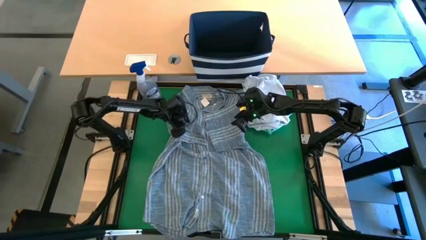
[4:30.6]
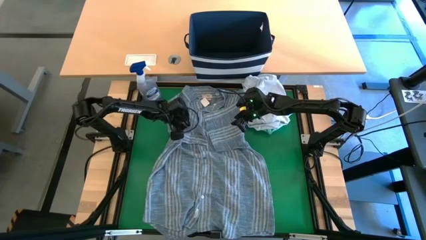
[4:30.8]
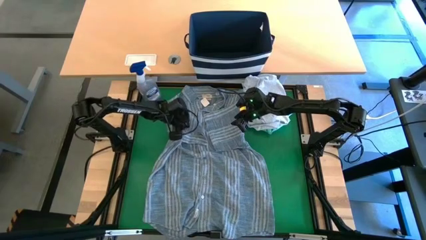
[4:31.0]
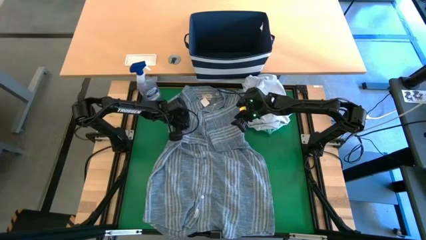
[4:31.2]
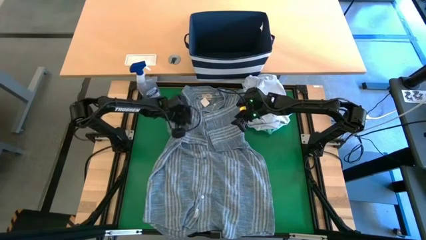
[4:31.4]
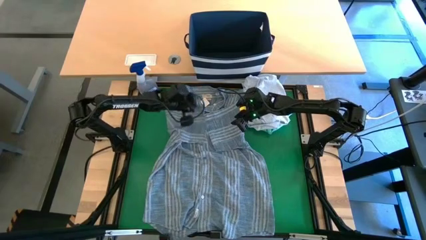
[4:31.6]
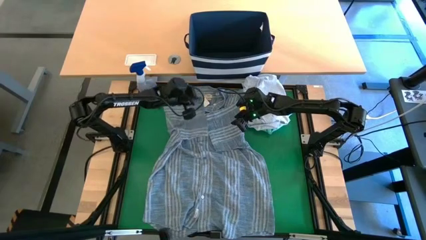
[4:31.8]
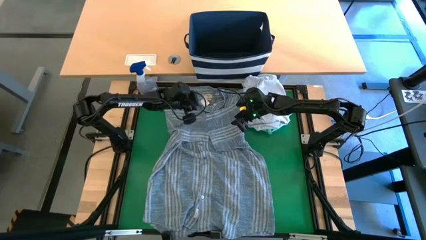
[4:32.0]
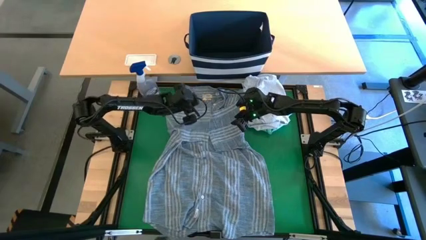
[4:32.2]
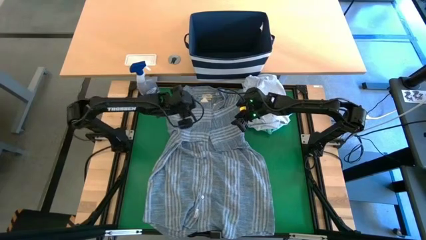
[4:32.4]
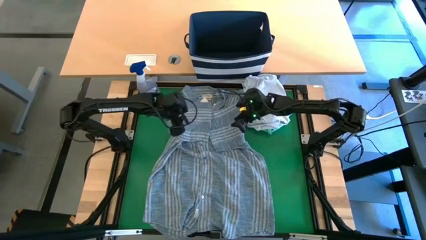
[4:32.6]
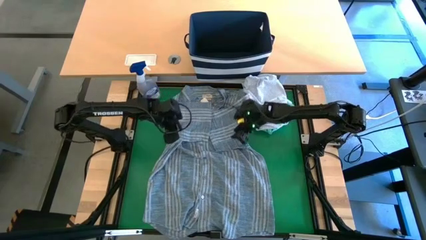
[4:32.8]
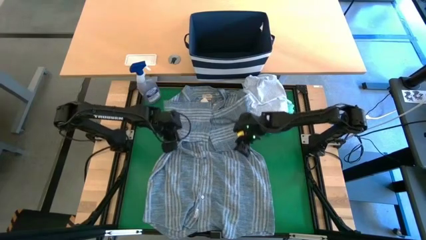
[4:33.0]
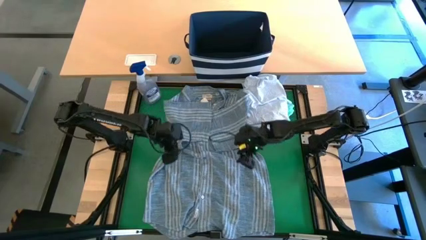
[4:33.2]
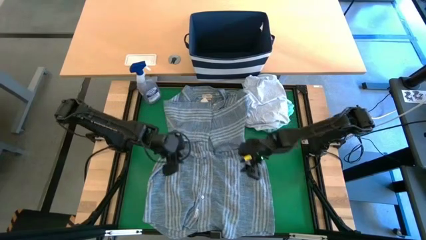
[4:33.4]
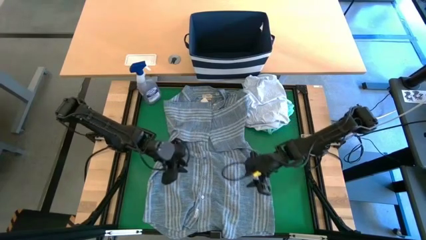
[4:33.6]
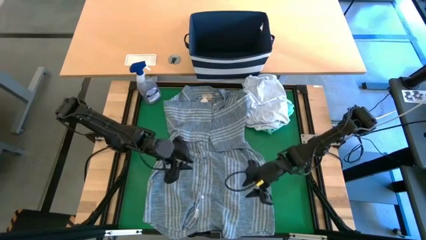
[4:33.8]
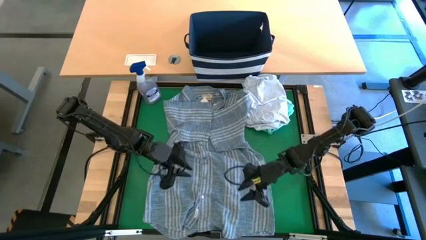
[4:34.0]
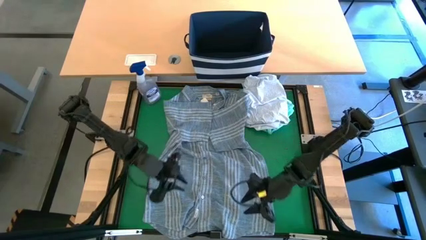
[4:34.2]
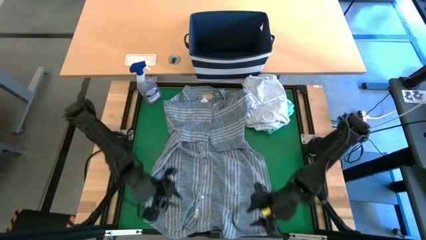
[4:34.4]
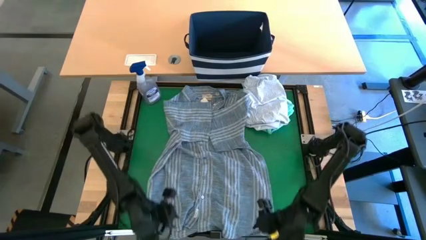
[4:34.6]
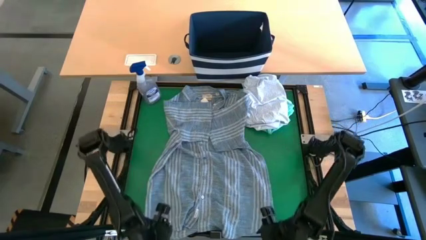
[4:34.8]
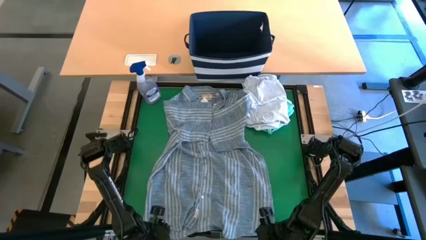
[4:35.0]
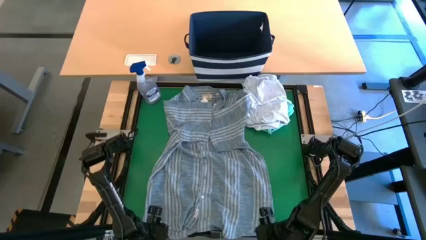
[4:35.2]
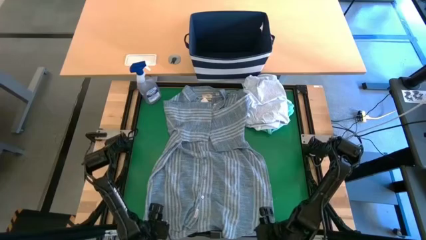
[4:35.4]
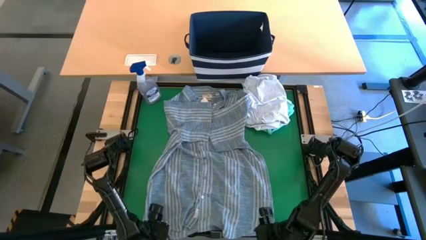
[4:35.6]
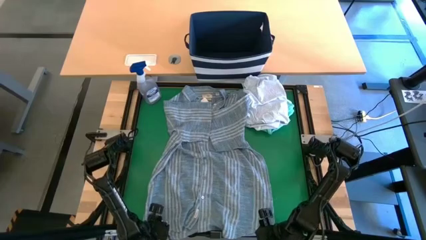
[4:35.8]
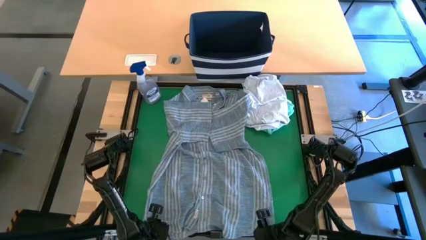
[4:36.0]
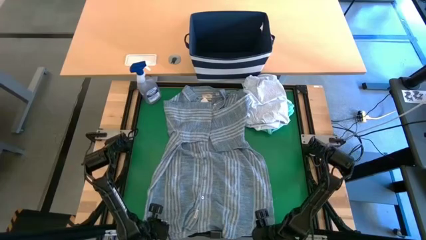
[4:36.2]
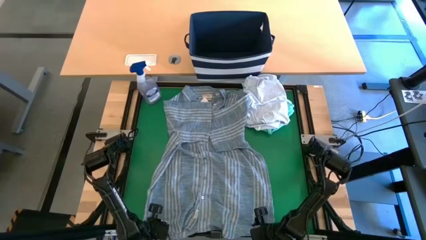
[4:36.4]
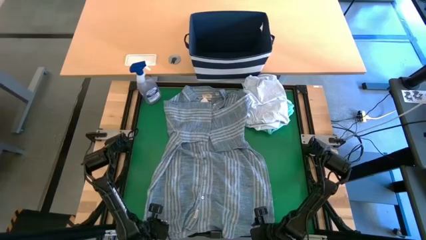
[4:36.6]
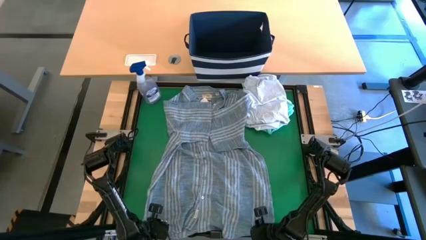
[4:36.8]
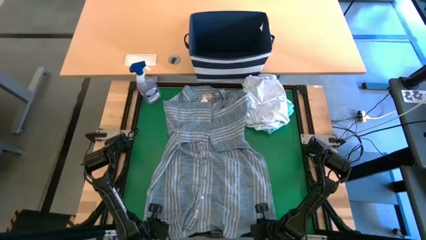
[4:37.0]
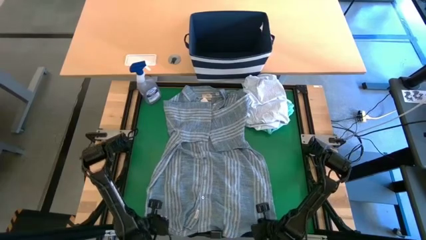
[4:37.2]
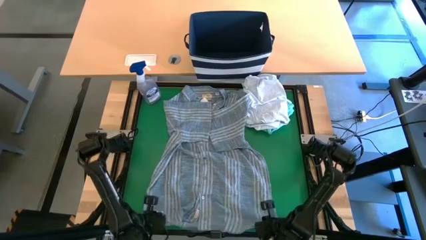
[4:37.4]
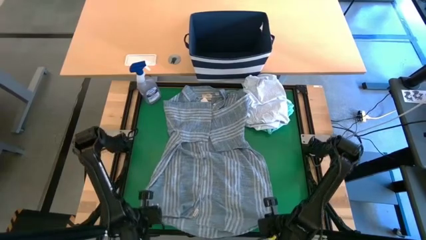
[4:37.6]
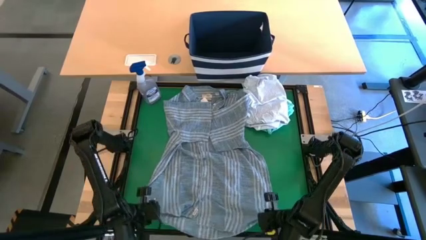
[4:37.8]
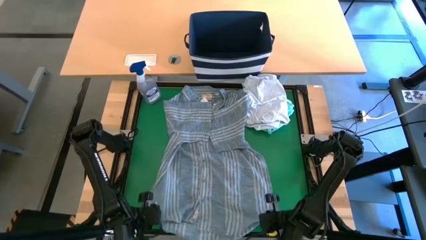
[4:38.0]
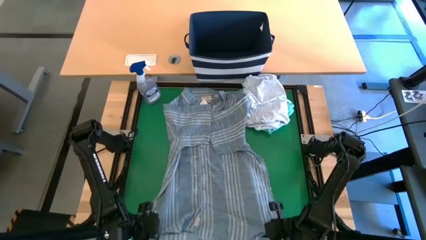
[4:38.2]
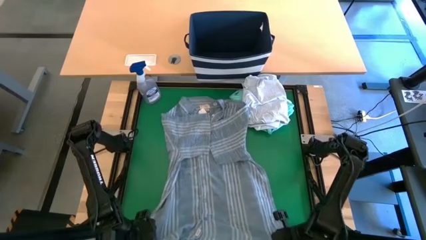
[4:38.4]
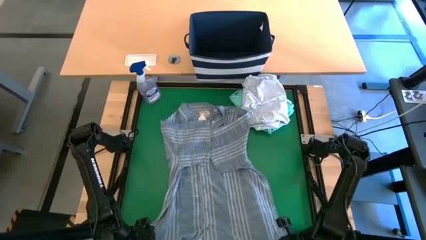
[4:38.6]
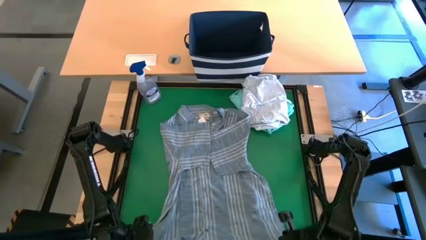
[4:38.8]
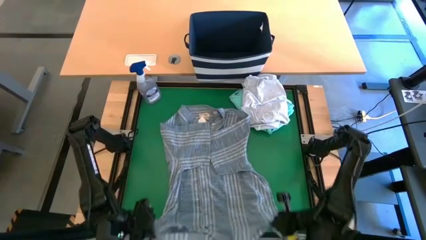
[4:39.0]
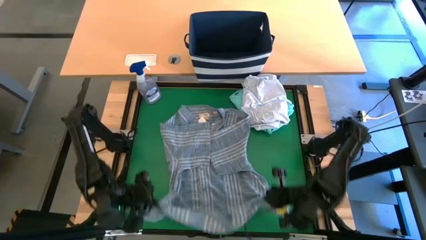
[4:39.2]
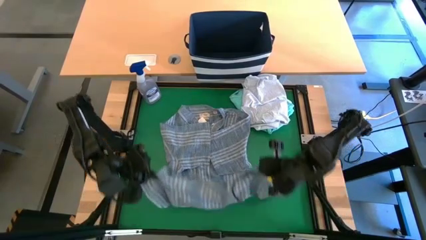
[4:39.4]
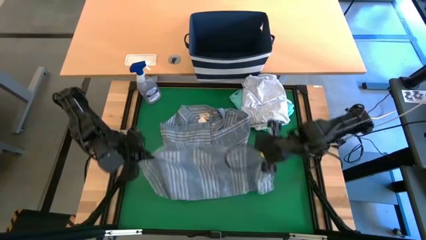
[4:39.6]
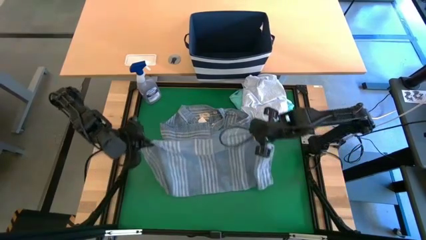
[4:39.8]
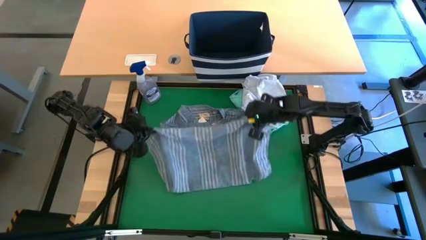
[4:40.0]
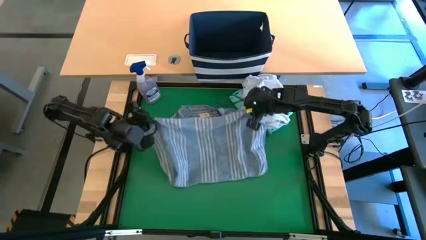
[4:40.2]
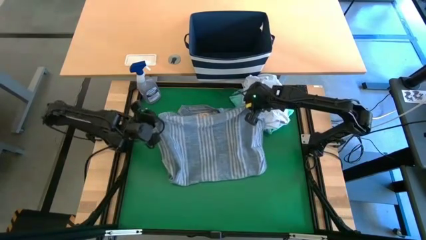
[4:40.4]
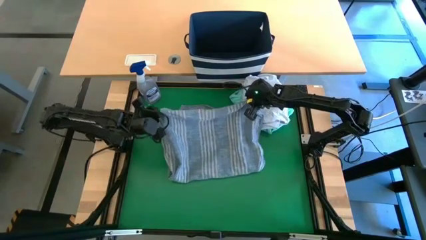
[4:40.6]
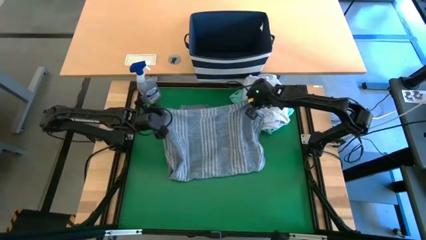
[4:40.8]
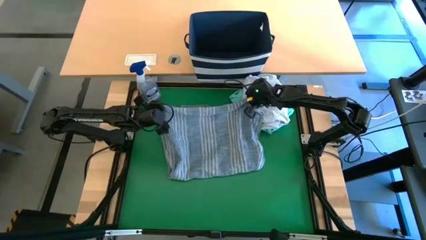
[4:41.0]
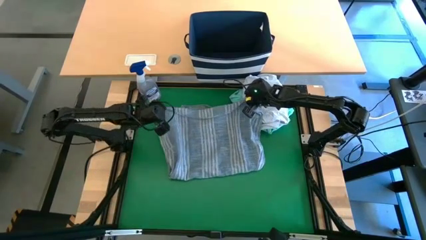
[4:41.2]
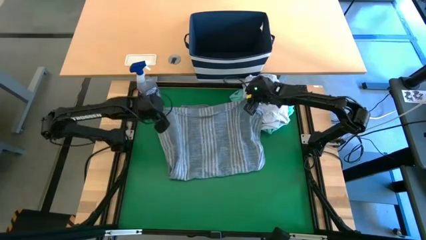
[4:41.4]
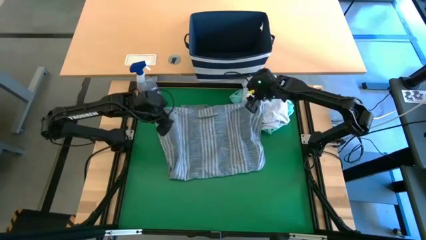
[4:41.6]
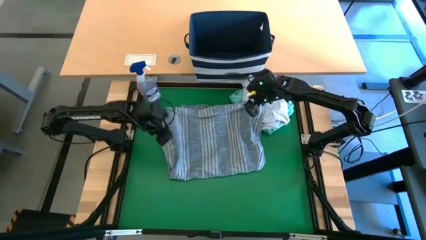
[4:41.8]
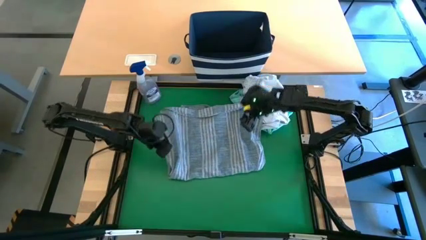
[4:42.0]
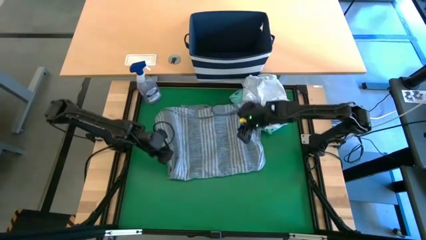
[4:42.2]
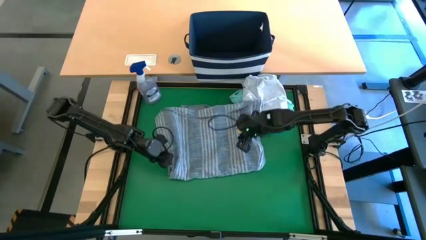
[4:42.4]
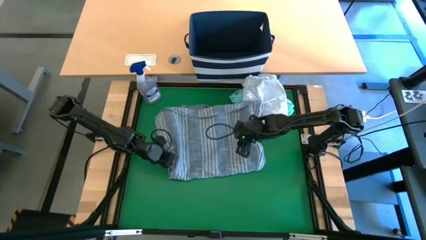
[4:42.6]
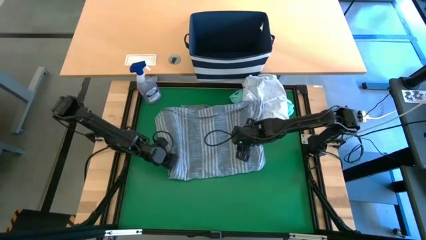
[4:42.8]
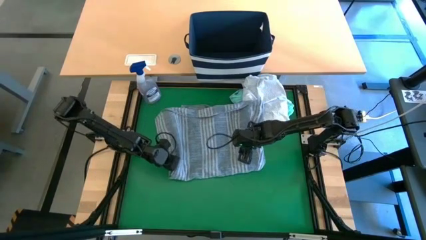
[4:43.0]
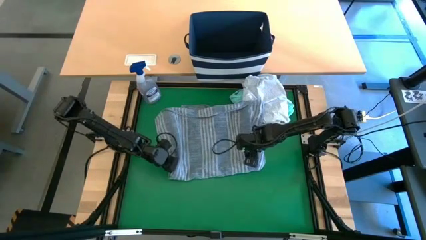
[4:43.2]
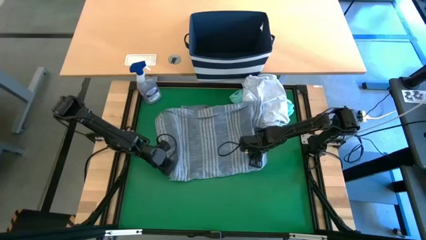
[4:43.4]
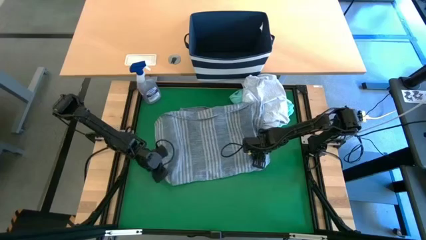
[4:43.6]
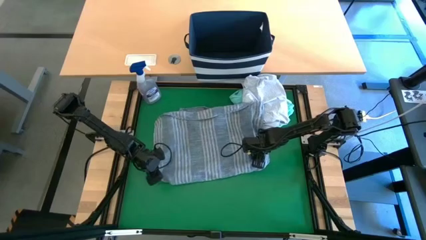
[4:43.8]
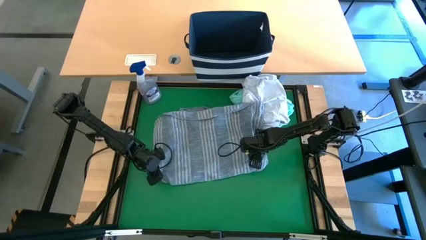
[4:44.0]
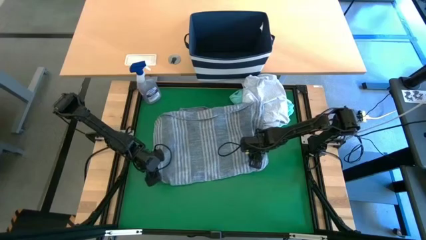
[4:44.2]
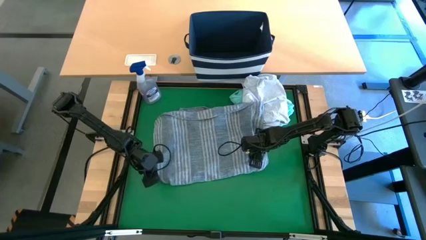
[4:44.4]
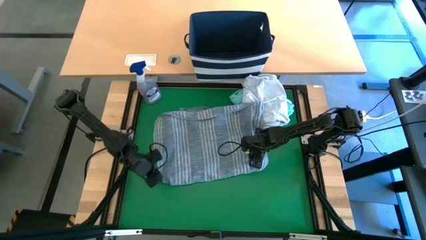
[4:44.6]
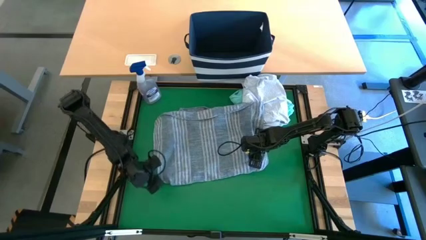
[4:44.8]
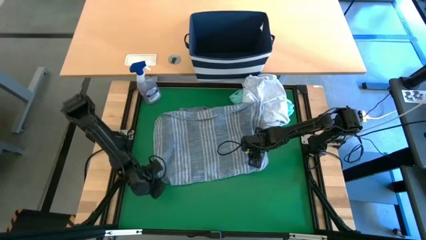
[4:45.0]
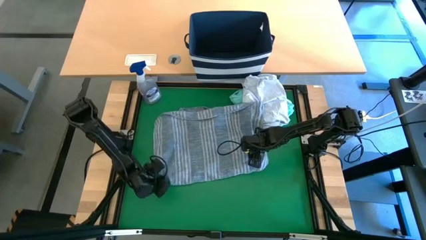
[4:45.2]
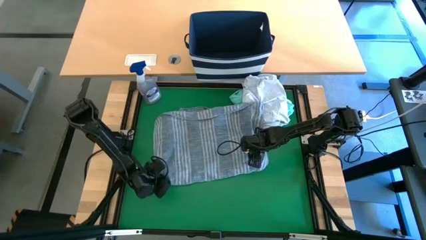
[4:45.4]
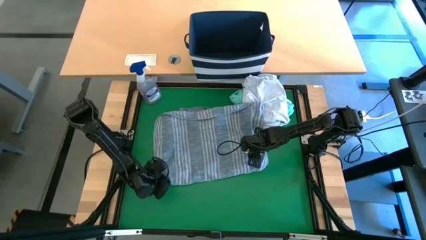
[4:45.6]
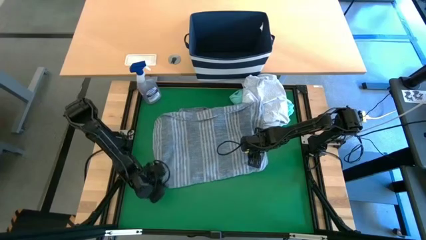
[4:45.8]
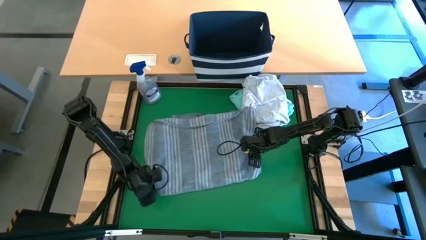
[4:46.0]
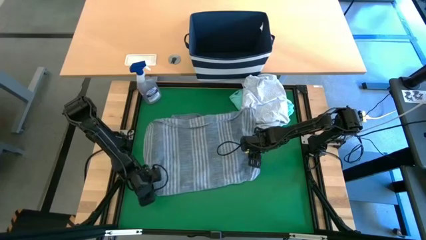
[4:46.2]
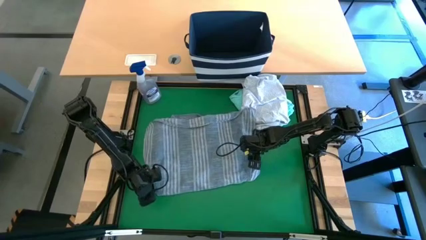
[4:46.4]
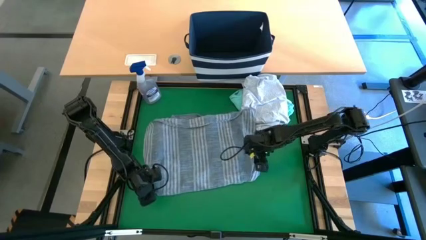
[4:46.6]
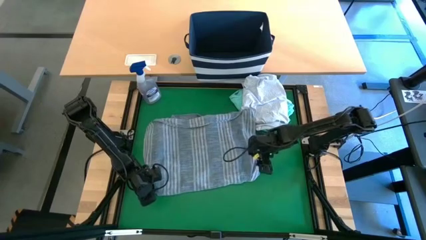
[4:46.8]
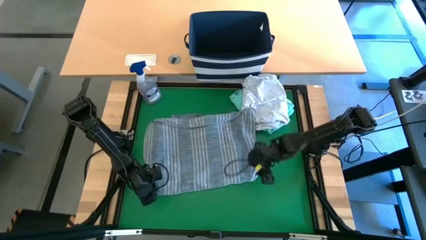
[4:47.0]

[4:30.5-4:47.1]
Task: Fold laundry
Fold the blue polo shirt

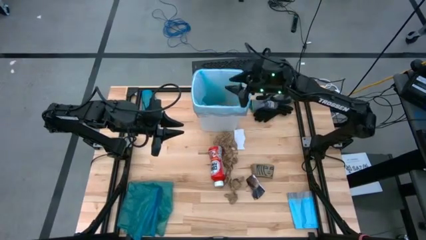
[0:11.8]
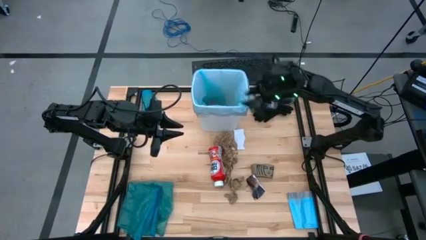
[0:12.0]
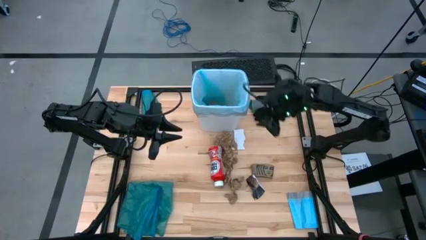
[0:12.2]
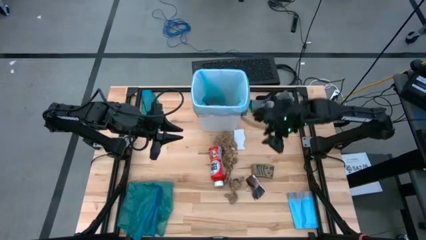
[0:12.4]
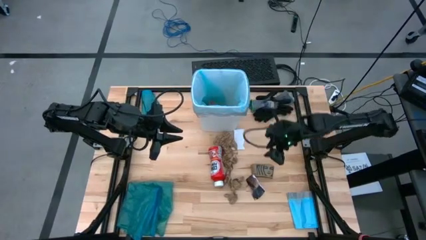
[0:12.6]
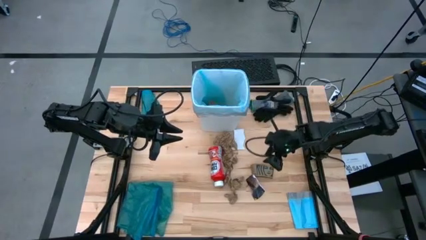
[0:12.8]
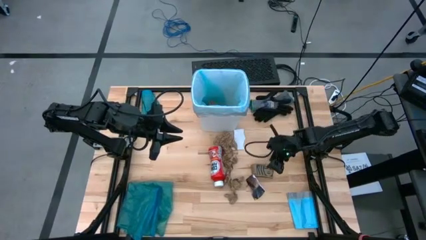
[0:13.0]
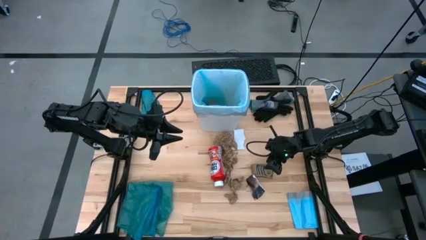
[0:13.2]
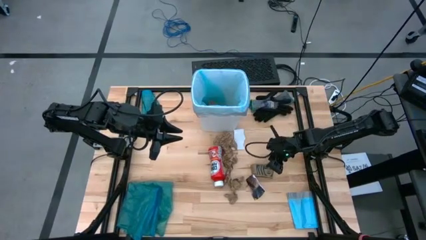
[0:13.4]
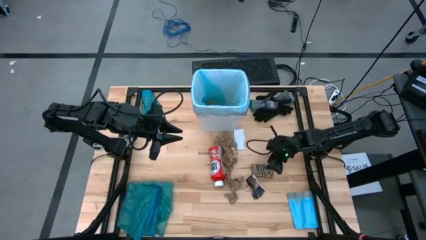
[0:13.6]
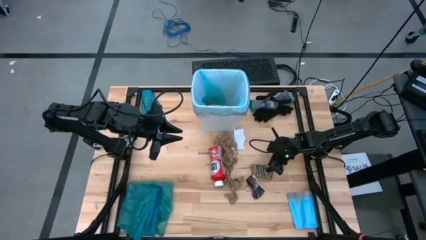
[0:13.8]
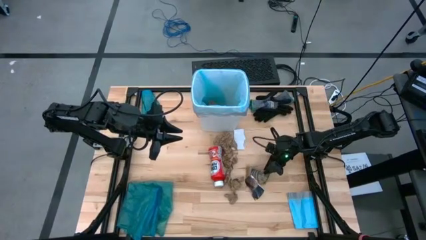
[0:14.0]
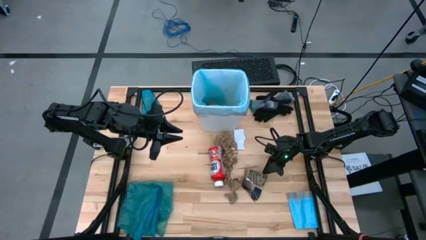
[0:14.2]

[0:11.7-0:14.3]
Task: place trash/remove bag and relplace
Put the brown coffee sleeve into the white trash bin
